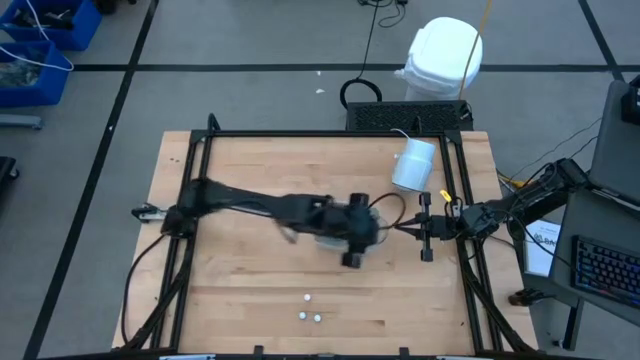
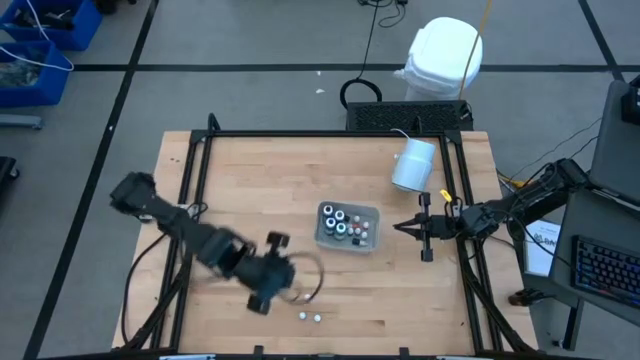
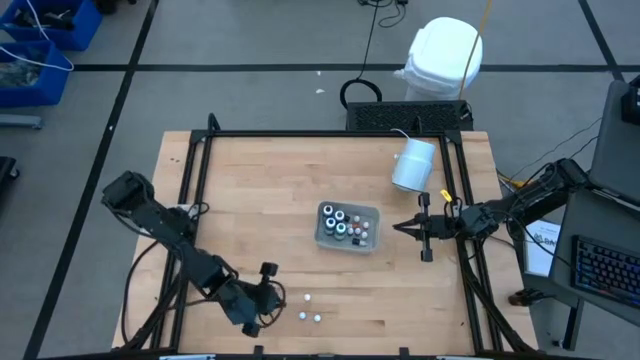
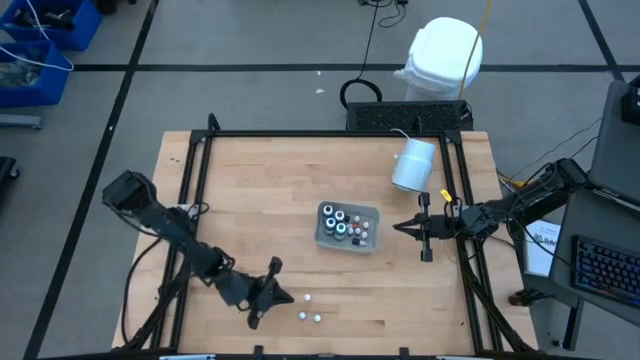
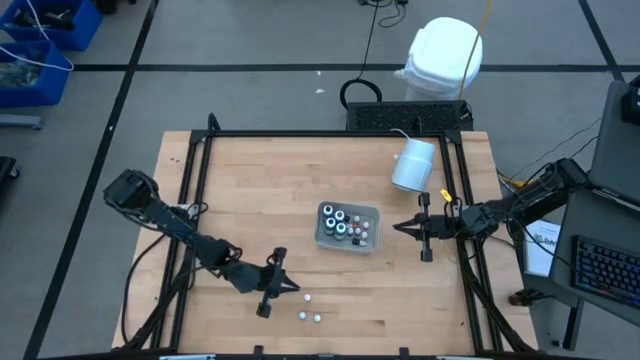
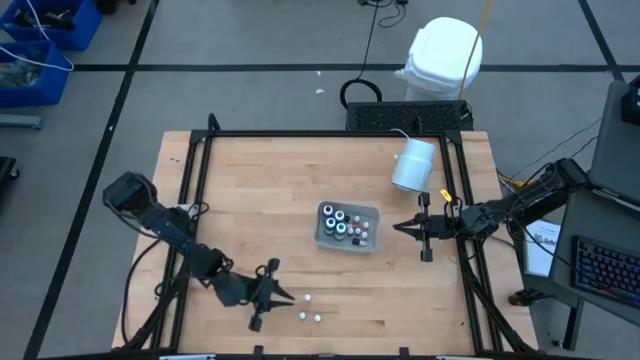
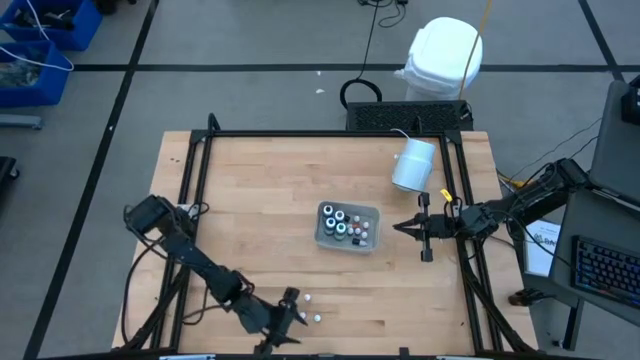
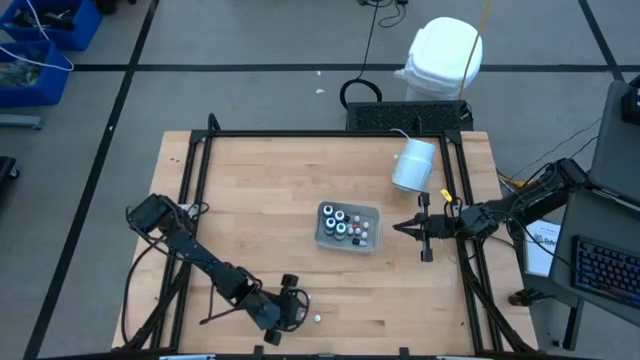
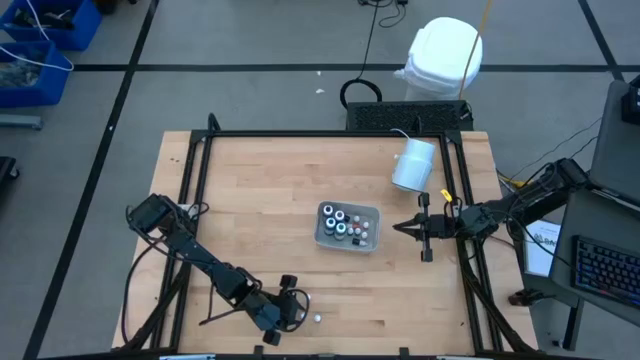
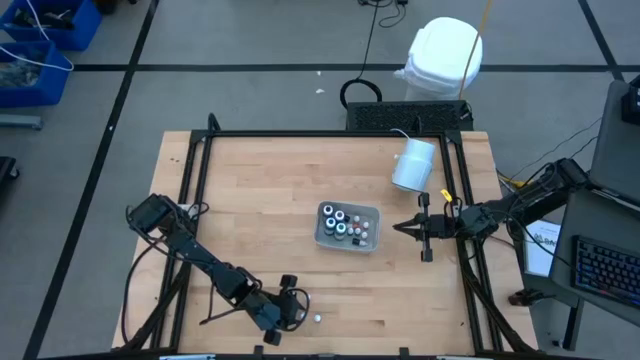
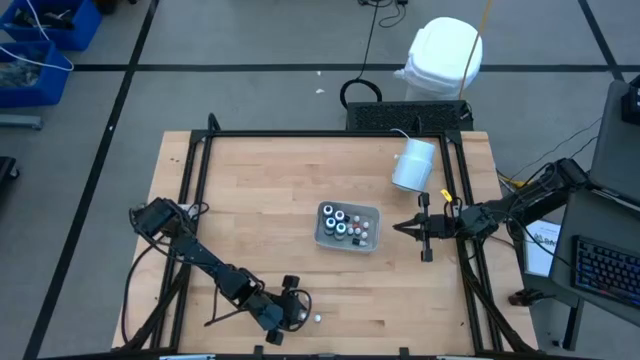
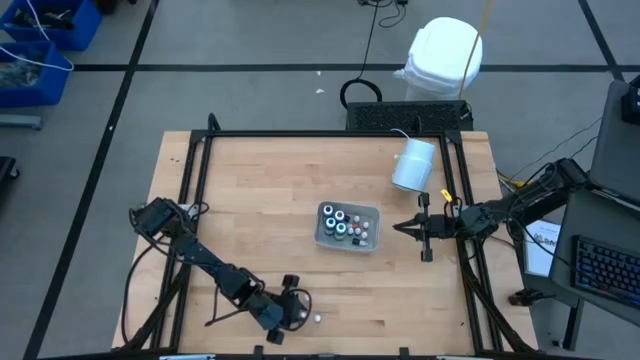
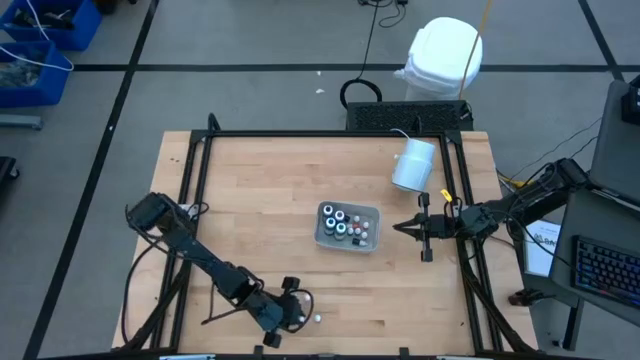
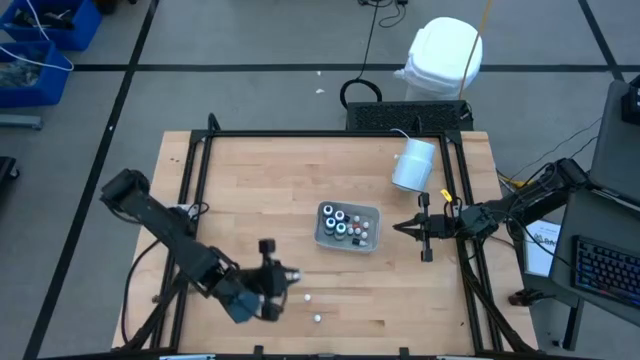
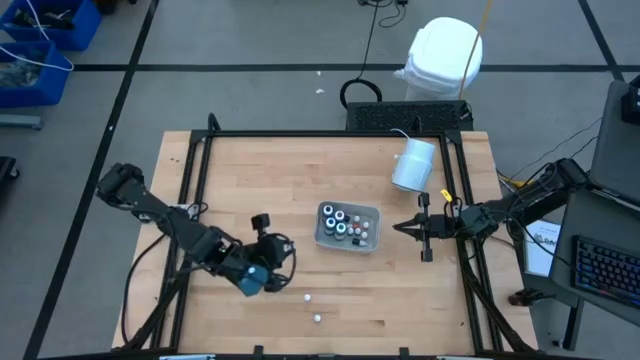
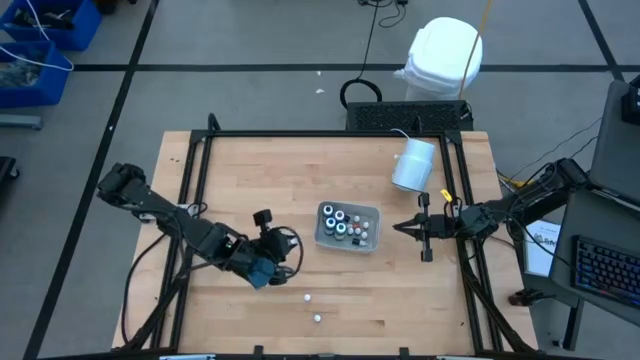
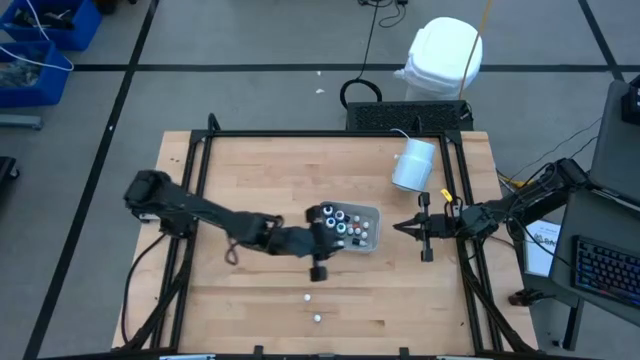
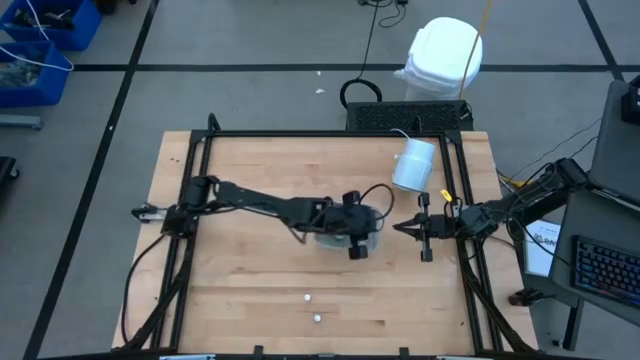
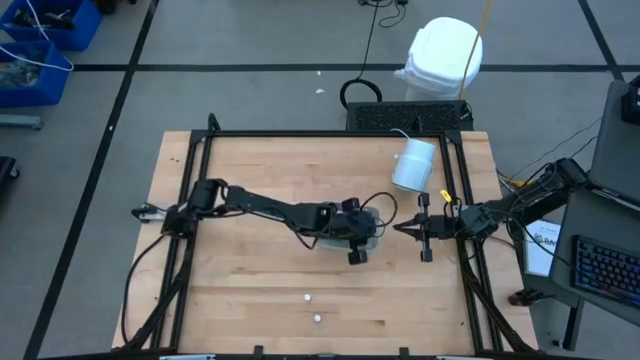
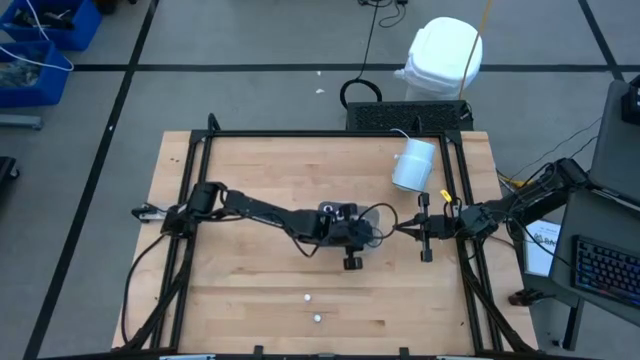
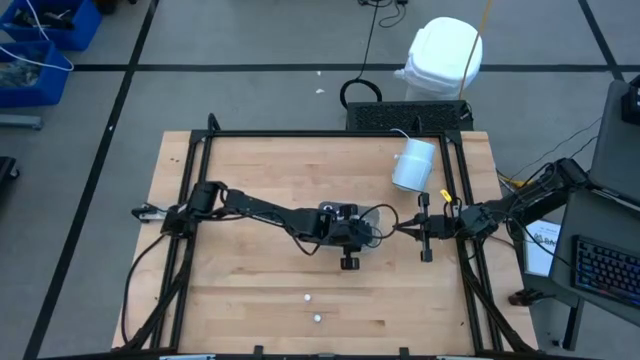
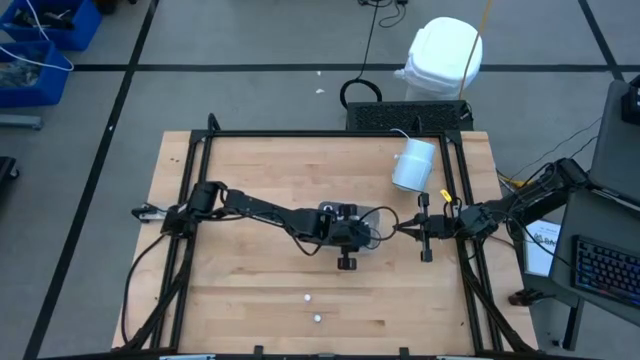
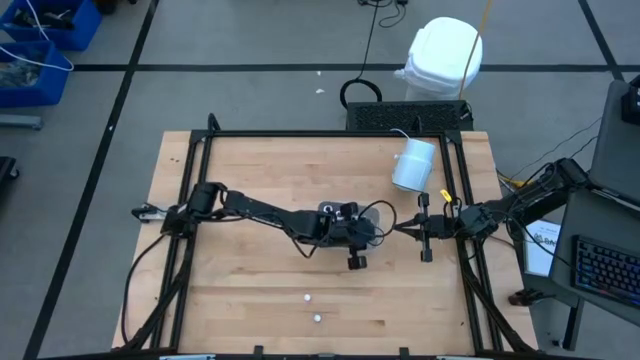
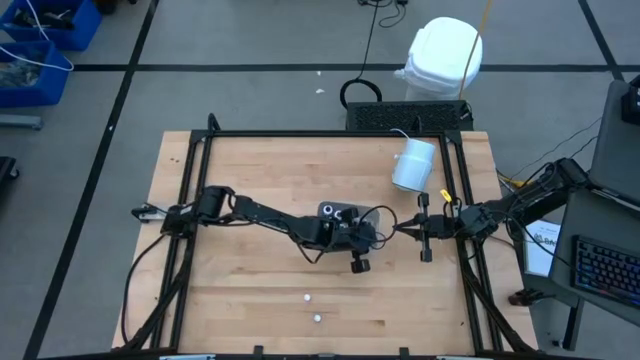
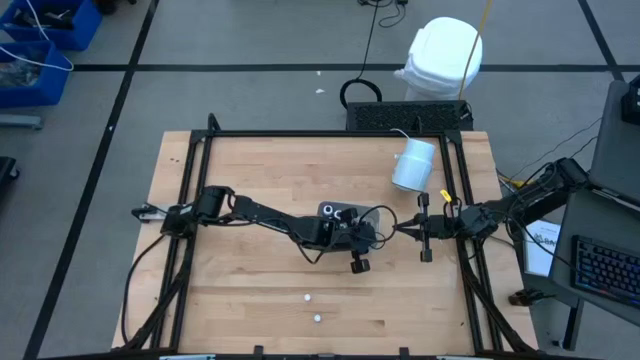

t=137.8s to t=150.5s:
Task: Pick & Place food coloring
Put the small dark blue bottle into the gray bin

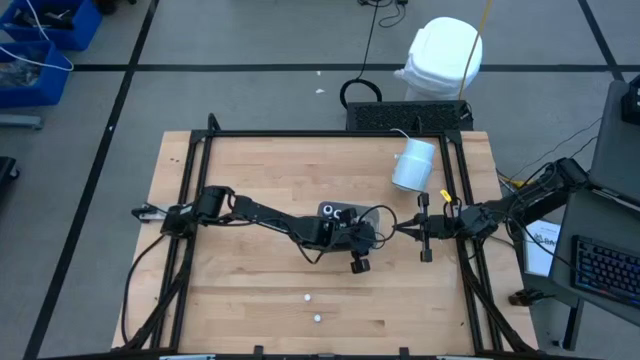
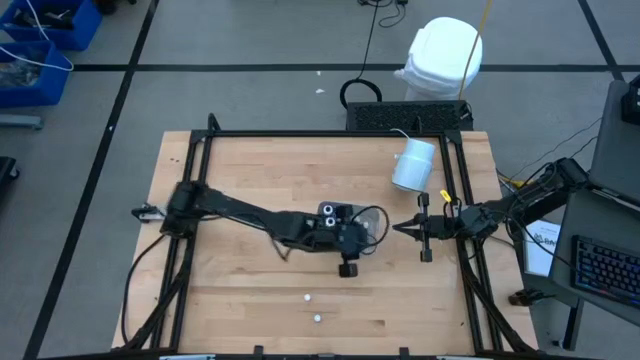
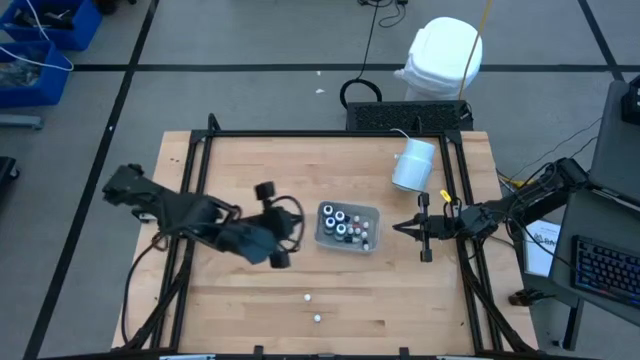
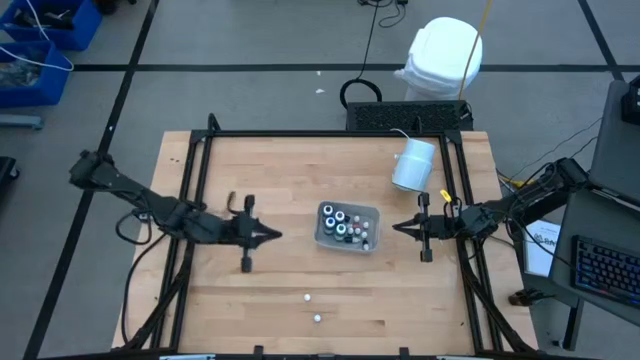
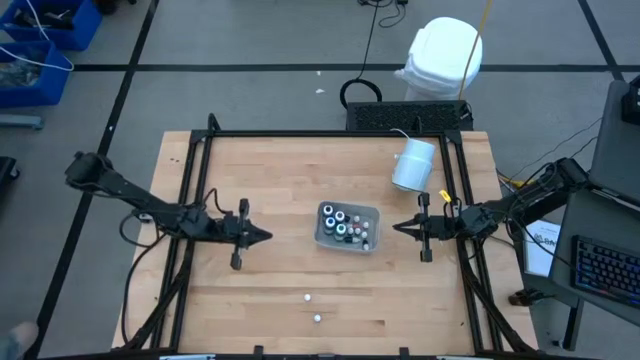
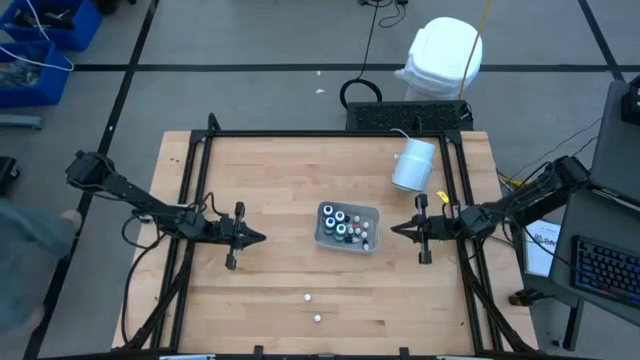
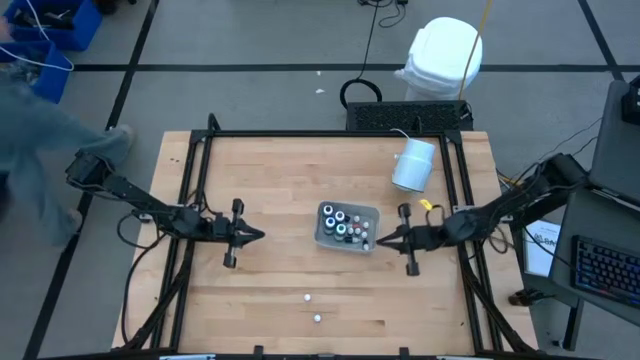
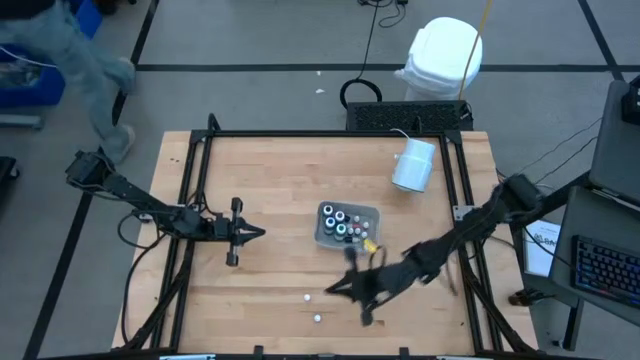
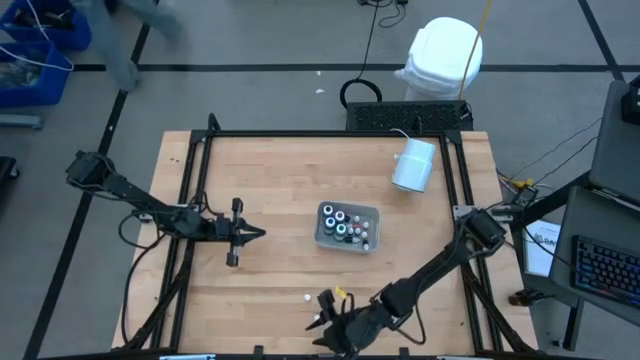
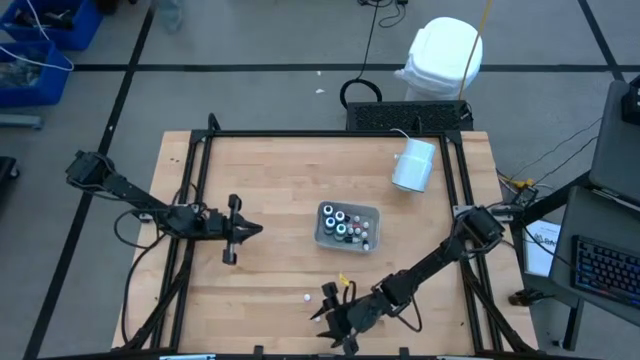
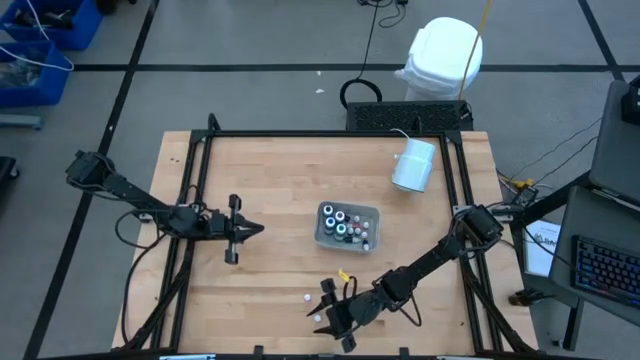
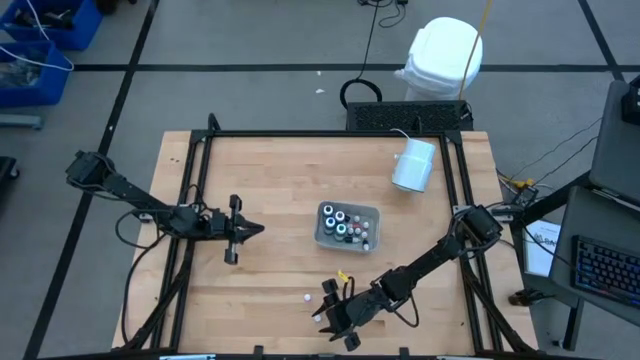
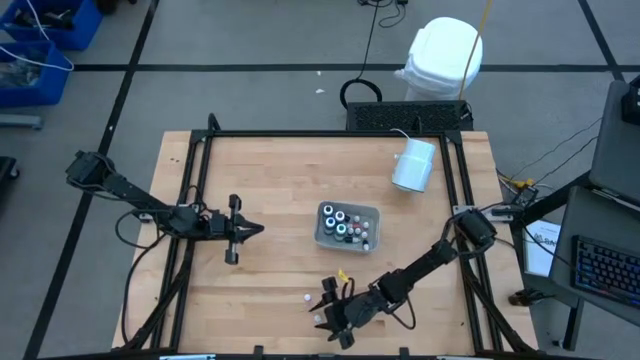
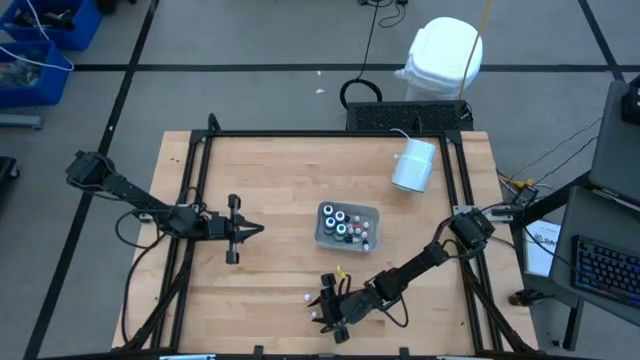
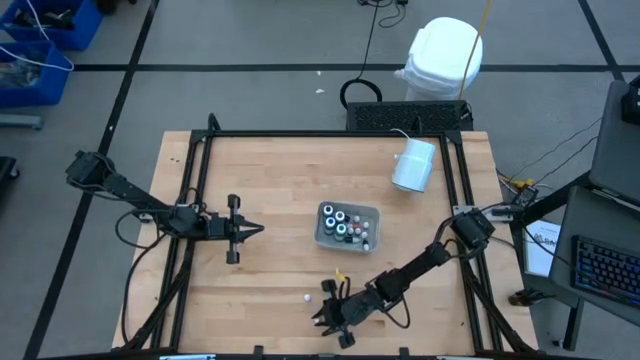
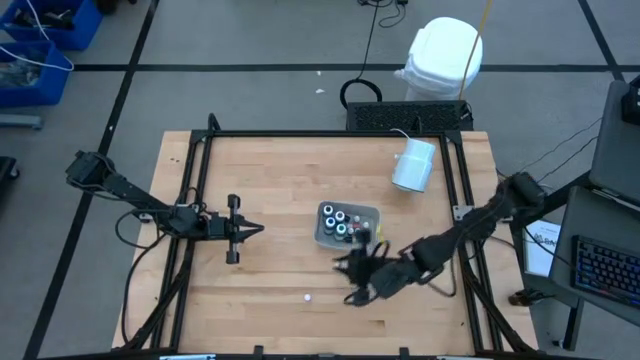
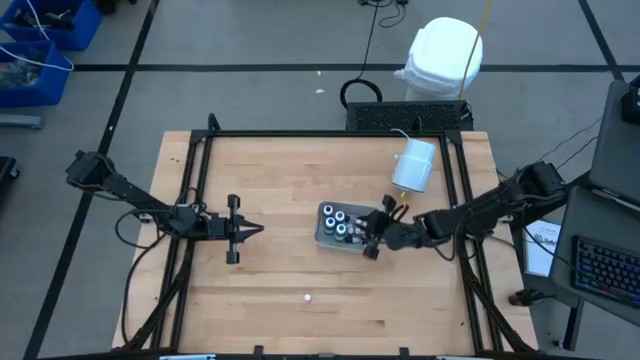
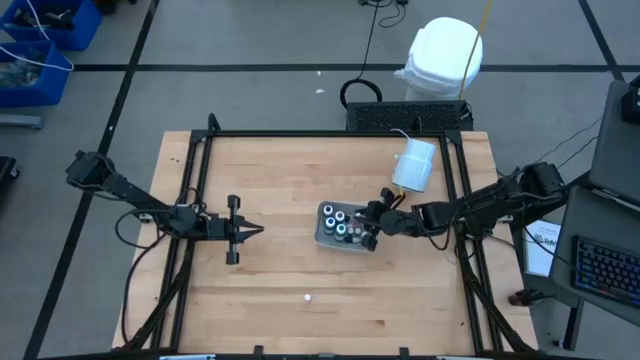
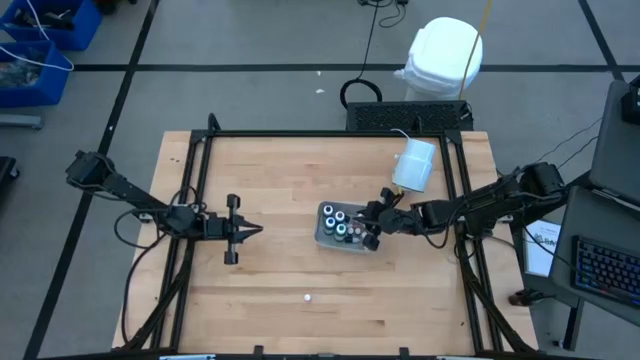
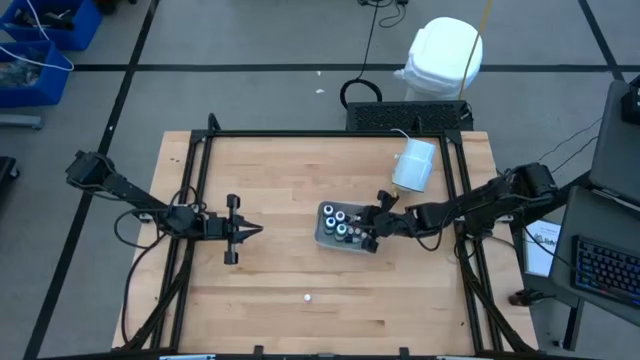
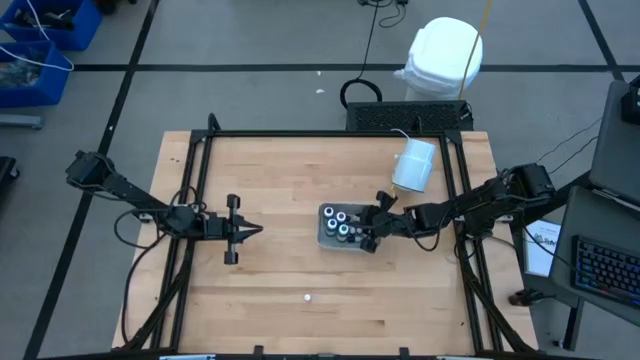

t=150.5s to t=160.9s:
Put the small yellow bottle into the gray bin
